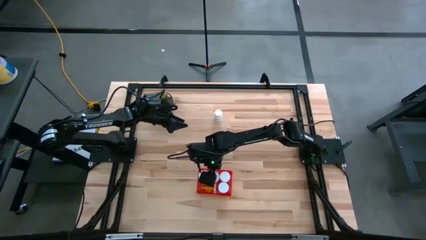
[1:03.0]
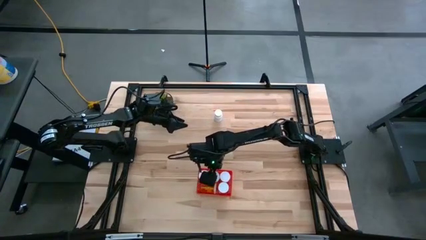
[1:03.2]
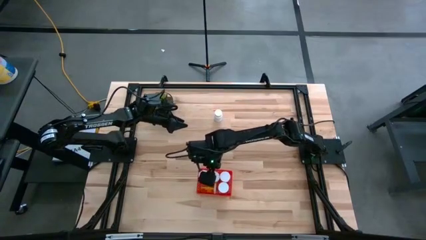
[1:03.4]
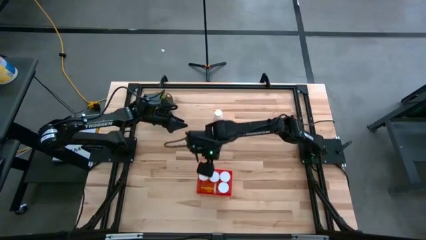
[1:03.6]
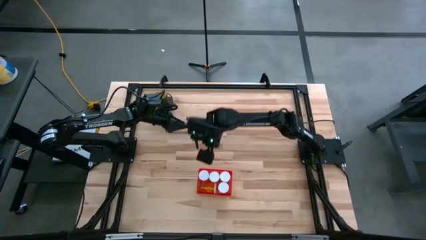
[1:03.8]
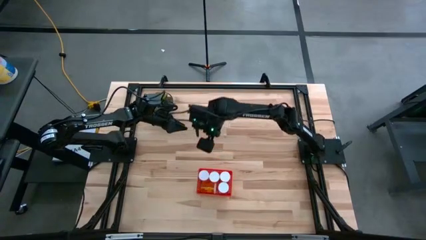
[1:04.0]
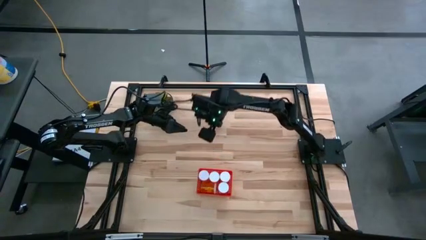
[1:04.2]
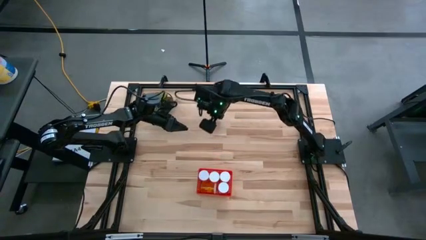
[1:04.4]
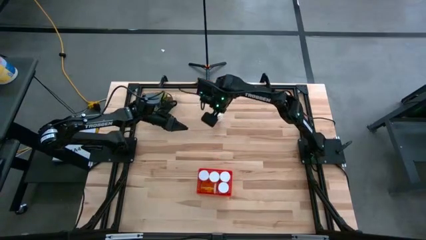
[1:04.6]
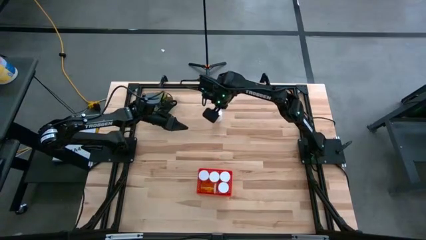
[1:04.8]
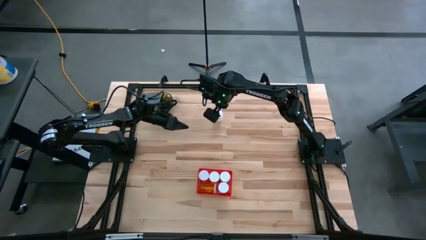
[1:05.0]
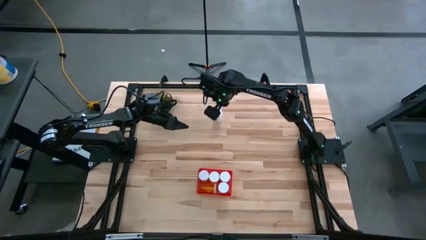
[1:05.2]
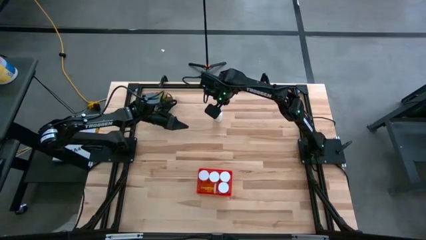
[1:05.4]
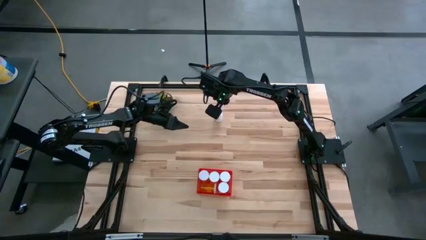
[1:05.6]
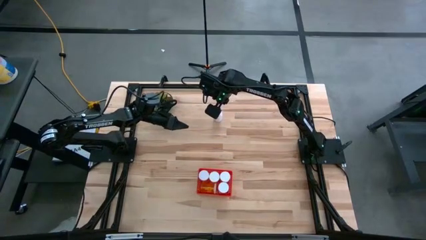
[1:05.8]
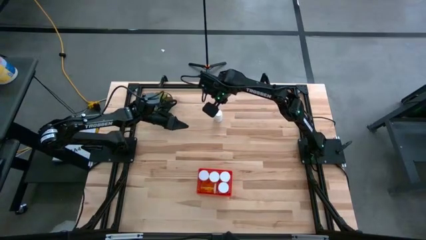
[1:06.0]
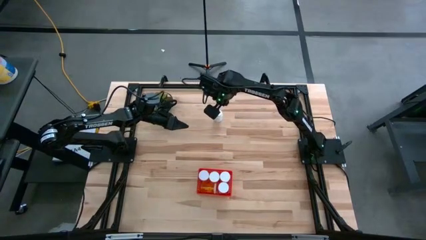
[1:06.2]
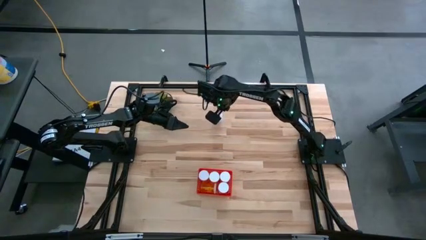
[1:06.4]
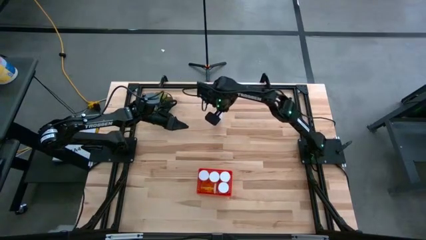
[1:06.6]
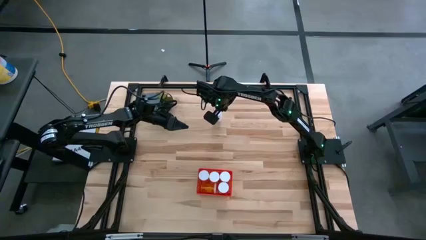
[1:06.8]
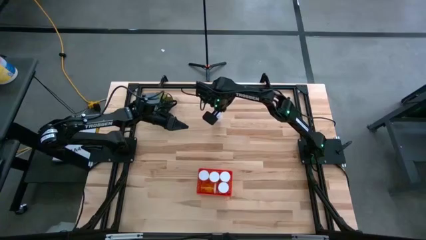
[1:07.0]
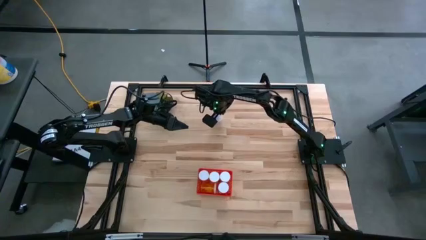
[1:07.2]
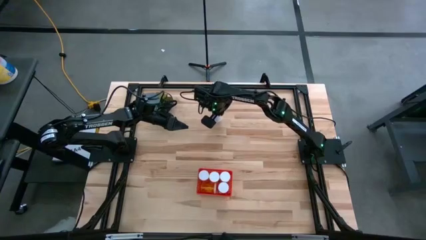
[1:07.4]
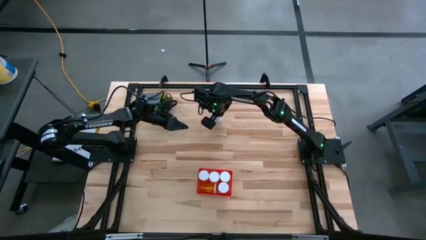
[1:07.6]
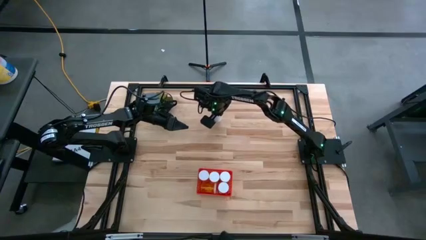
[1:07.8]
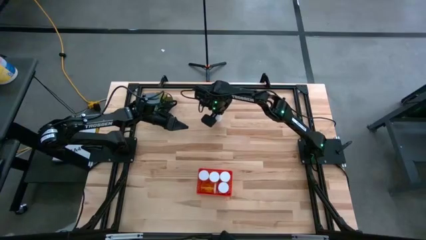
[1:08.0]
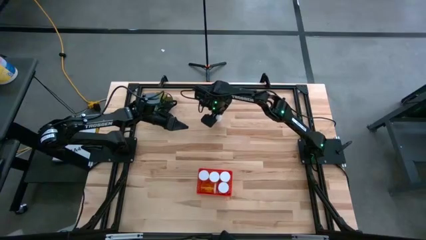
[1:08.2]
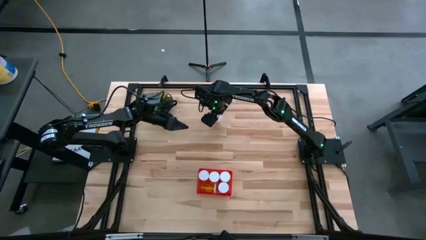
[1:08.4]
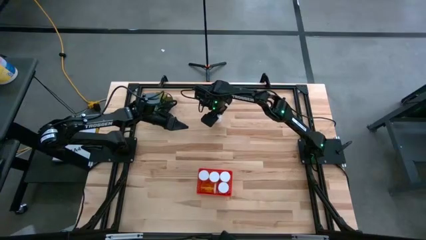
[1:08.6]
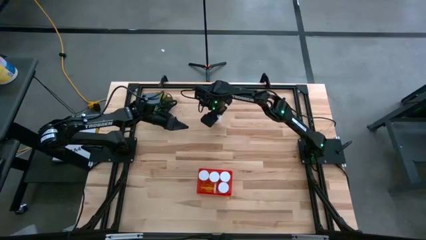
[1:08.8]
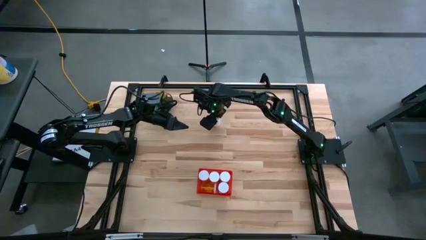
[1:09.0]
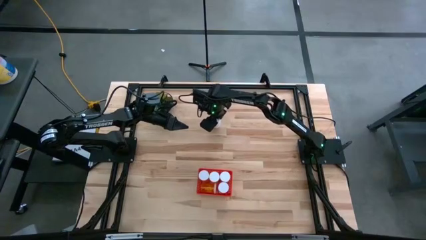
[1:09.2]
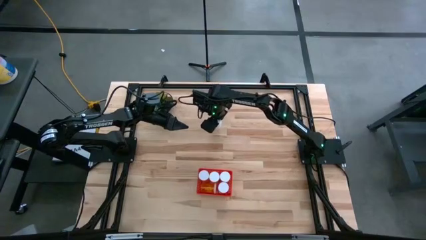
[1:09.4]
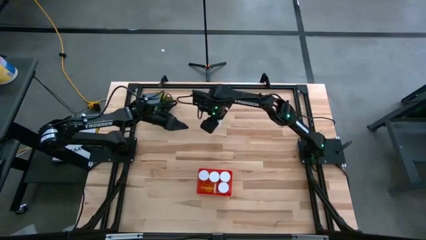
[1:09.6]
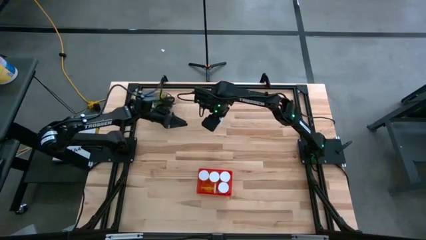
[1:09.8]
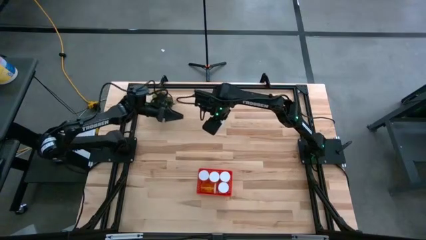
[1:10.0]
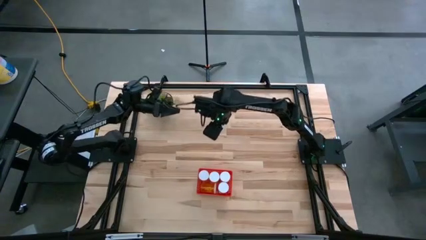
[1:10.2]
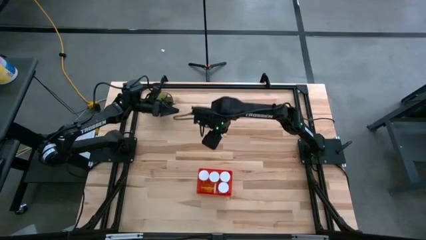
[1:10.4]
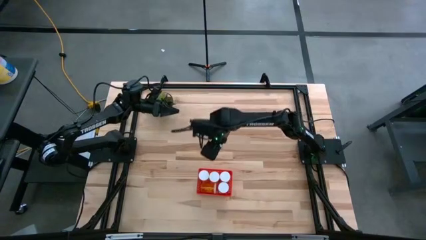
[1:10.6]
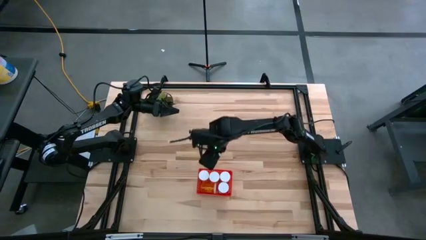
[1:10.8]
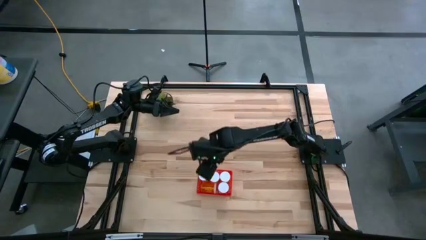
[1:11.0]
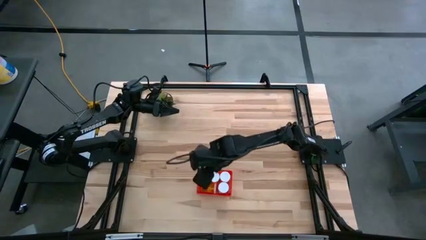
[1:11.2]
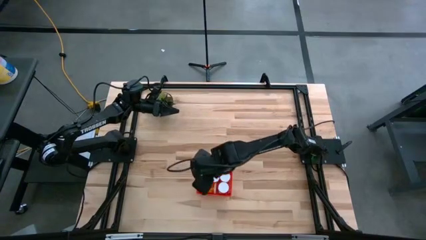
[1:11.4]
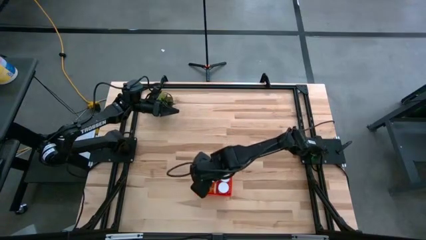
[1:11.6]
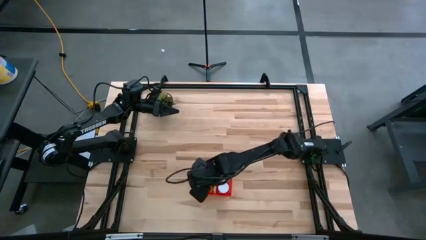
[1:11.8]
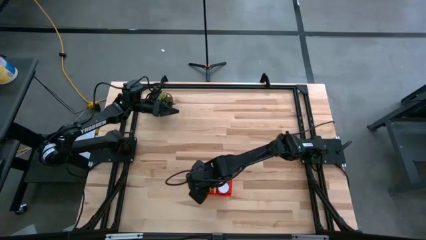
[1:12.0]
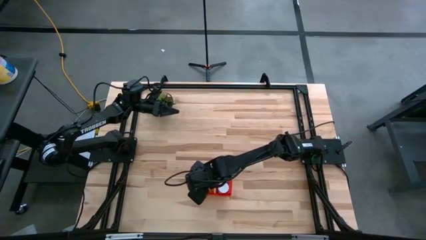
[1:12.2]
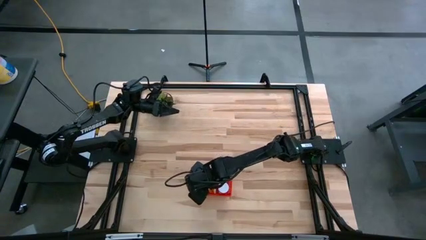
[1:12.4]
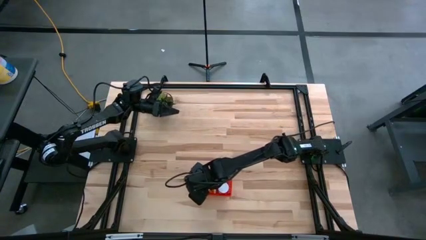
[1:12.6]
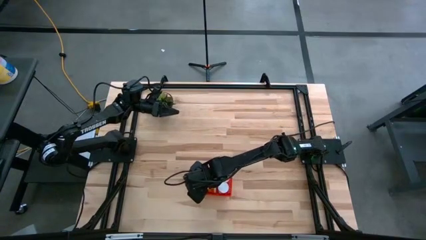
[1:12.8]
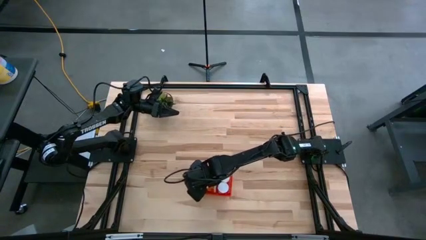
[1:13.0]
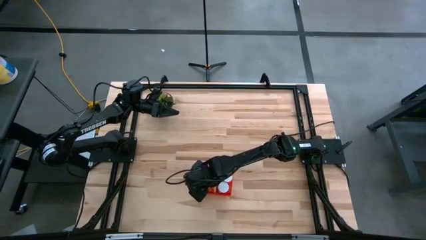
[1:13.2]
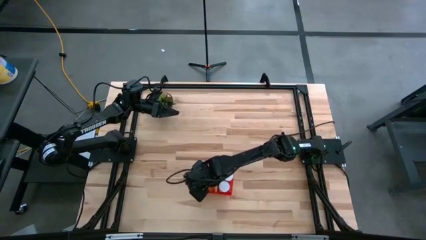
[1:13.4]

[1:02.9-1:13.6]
Task: Pick and place pill bottles into a basket
Put the white pill bottle into the red bin
